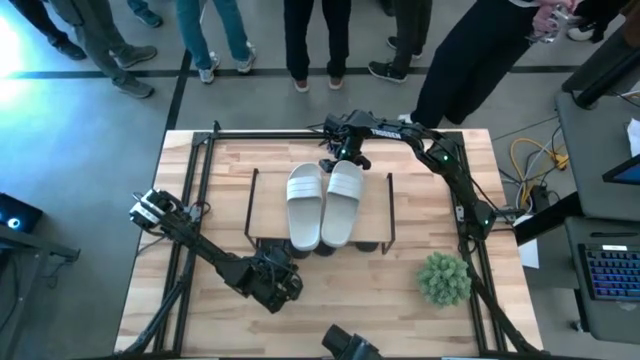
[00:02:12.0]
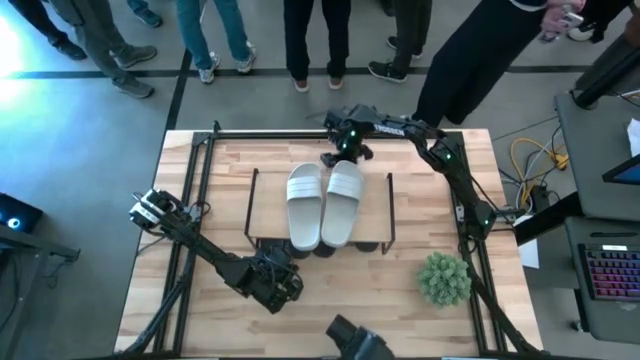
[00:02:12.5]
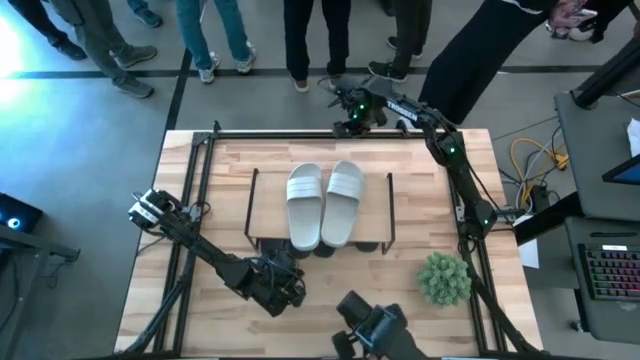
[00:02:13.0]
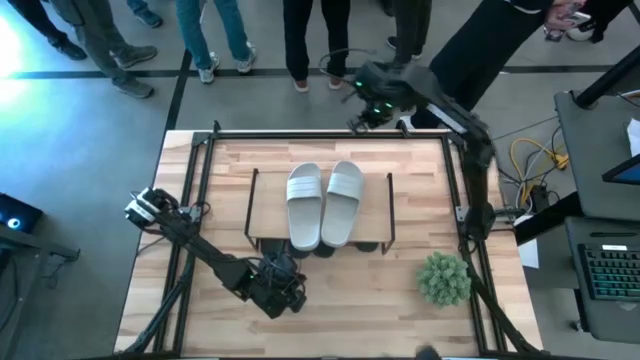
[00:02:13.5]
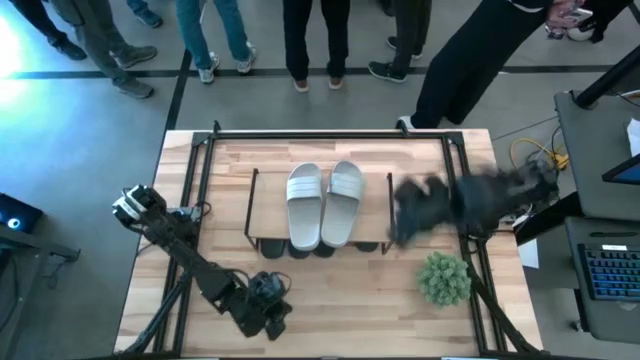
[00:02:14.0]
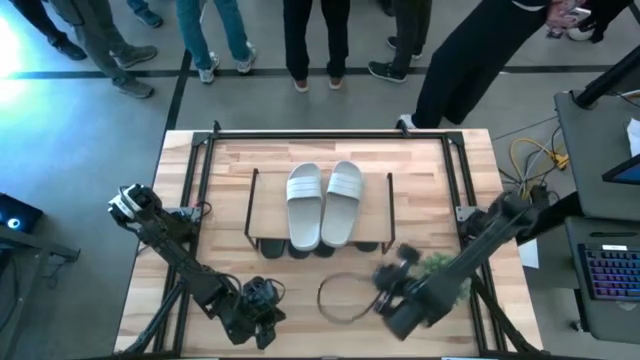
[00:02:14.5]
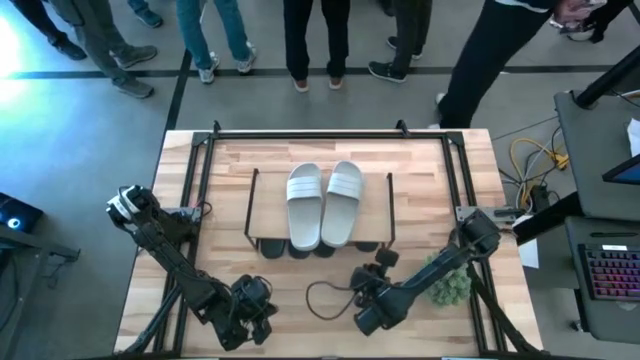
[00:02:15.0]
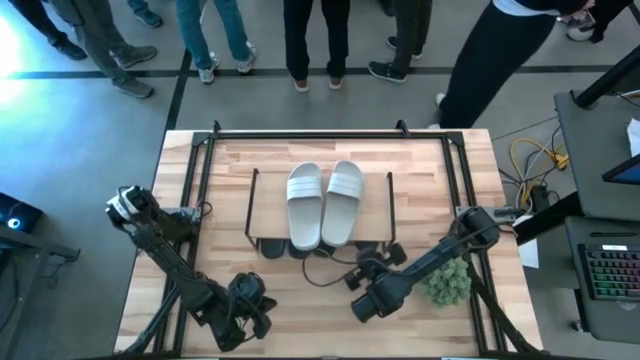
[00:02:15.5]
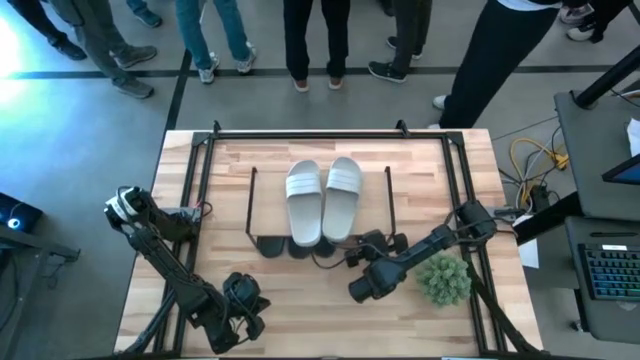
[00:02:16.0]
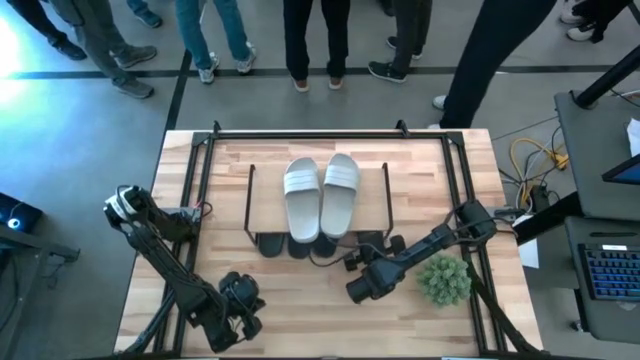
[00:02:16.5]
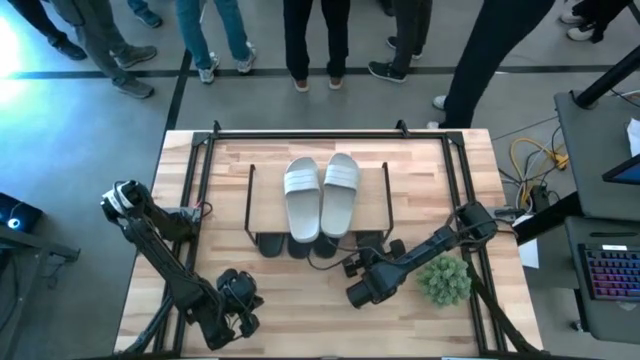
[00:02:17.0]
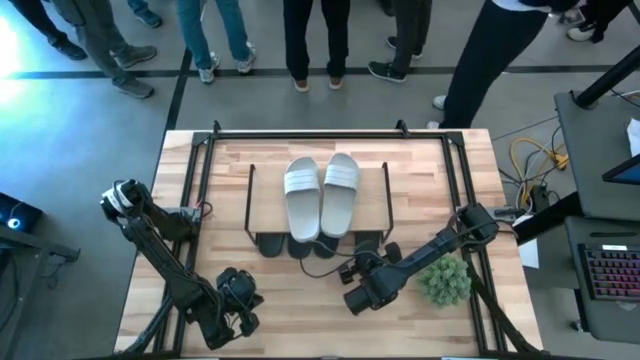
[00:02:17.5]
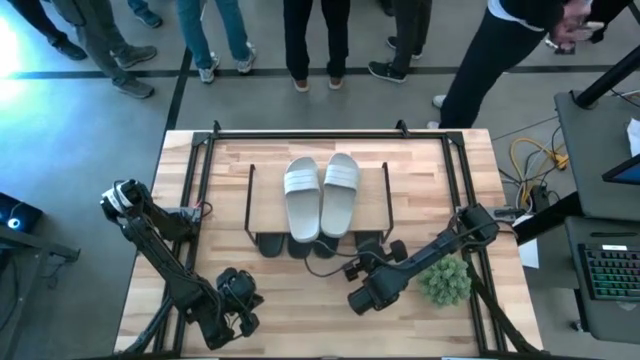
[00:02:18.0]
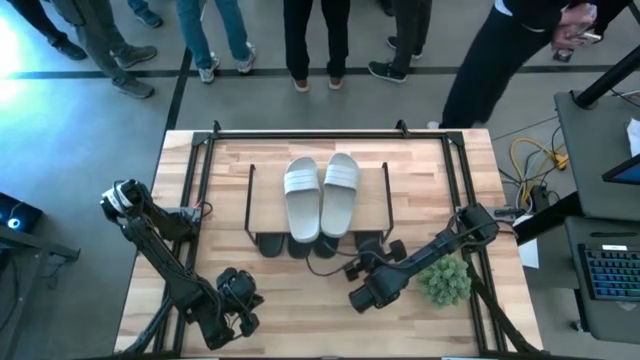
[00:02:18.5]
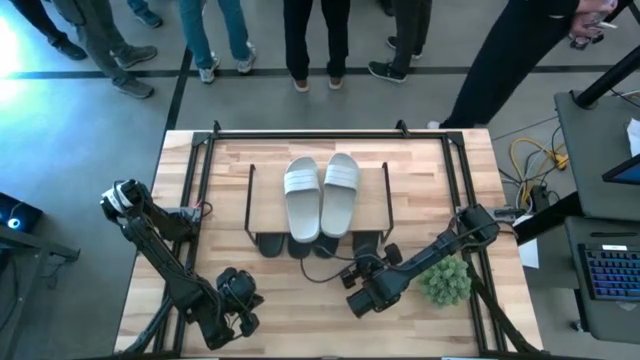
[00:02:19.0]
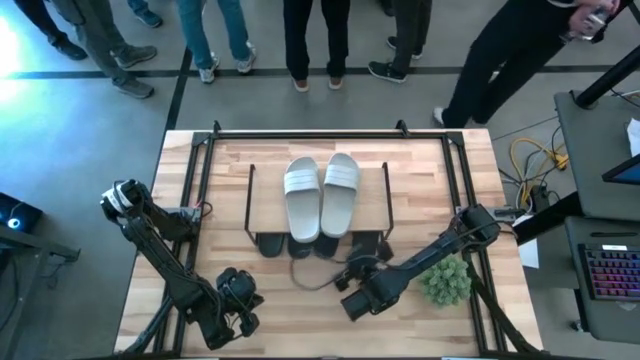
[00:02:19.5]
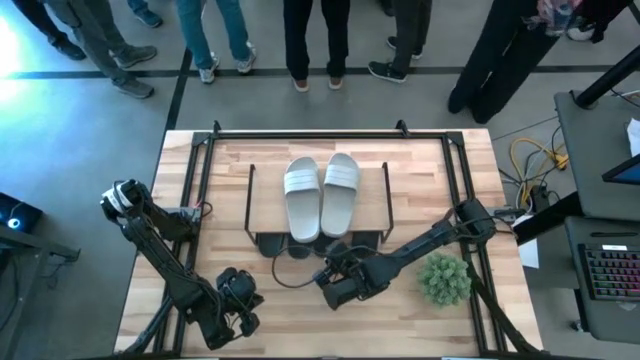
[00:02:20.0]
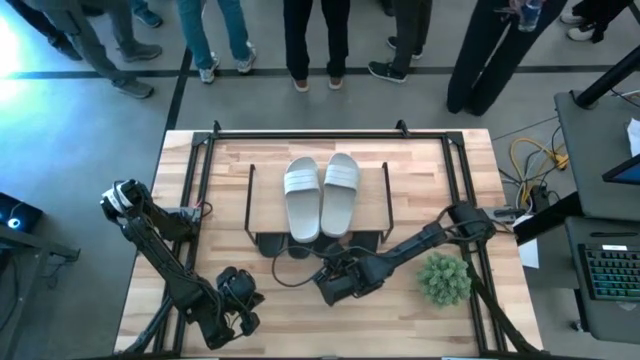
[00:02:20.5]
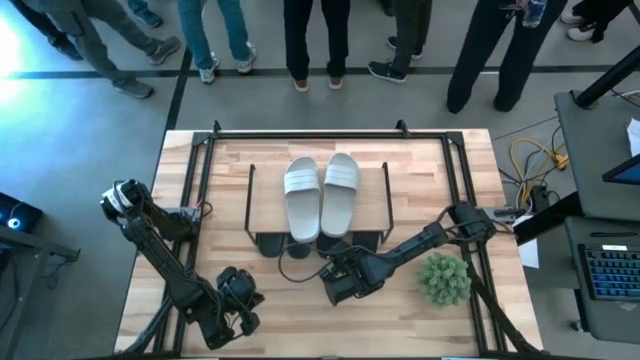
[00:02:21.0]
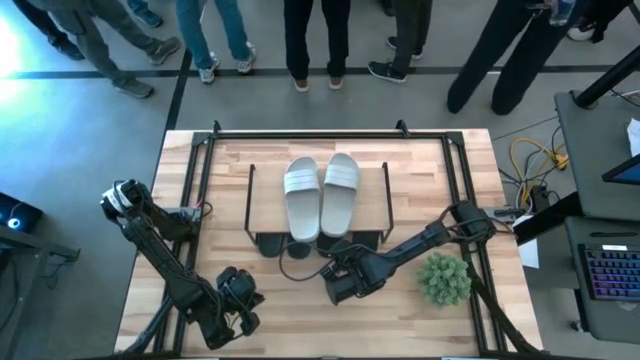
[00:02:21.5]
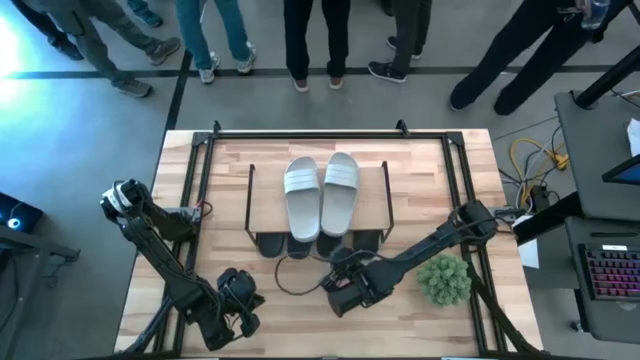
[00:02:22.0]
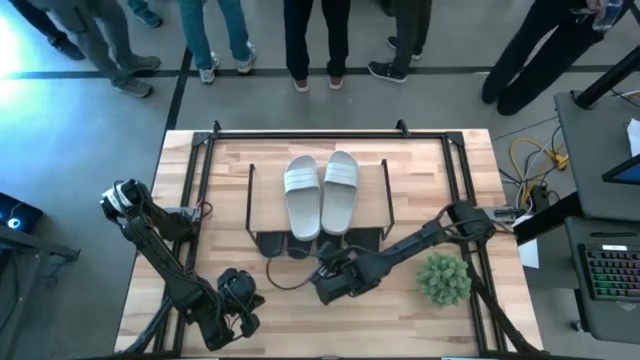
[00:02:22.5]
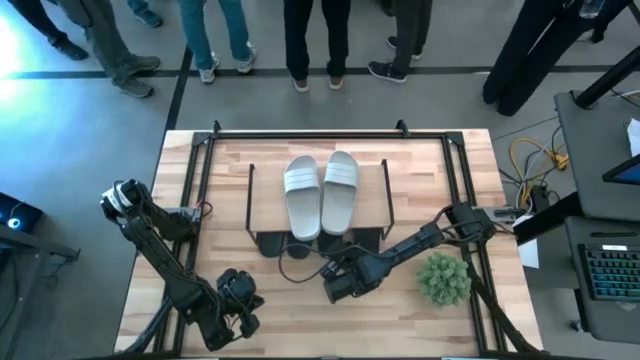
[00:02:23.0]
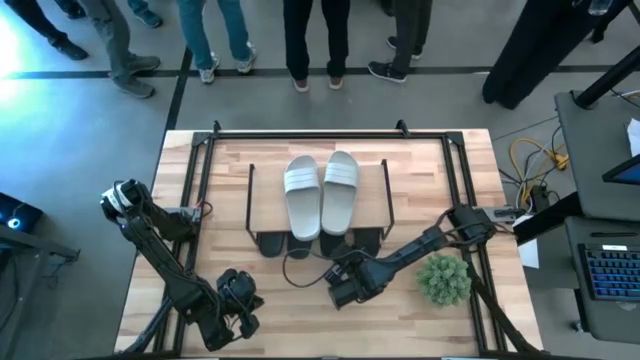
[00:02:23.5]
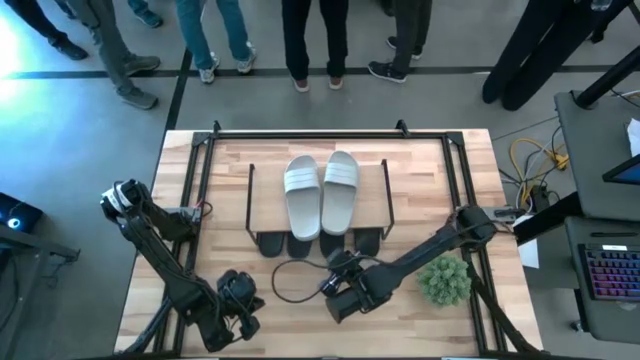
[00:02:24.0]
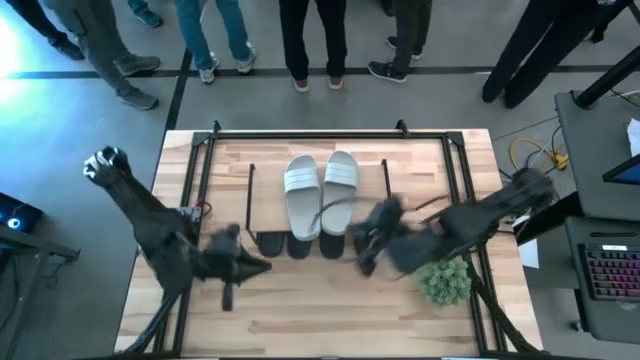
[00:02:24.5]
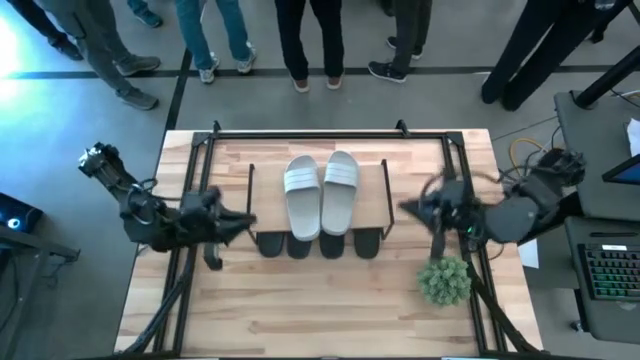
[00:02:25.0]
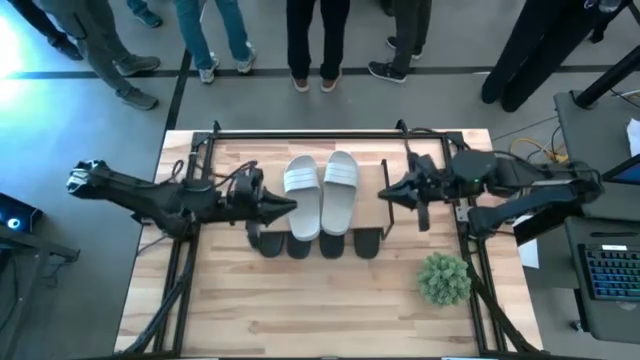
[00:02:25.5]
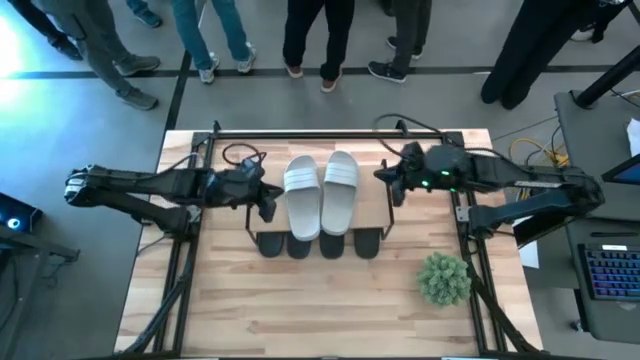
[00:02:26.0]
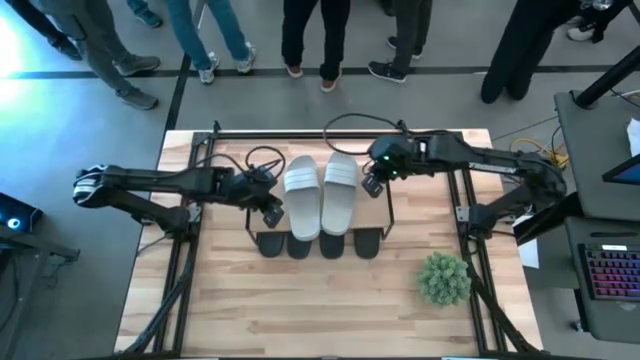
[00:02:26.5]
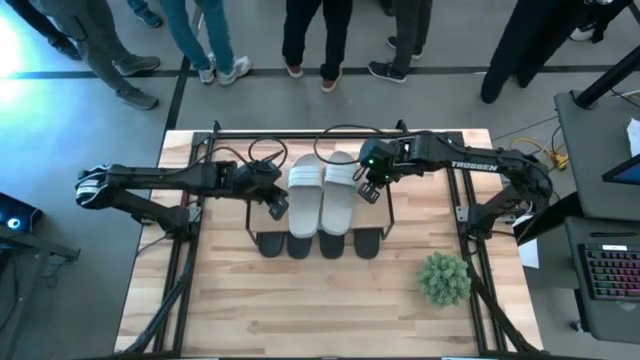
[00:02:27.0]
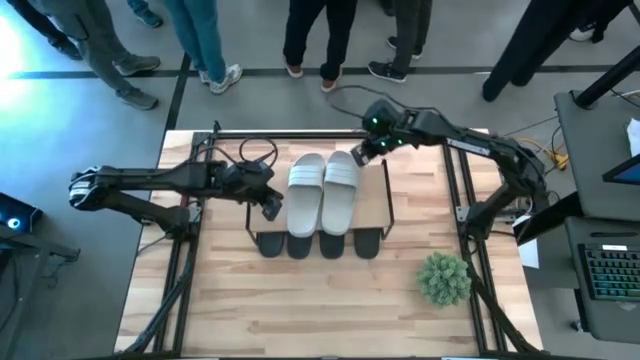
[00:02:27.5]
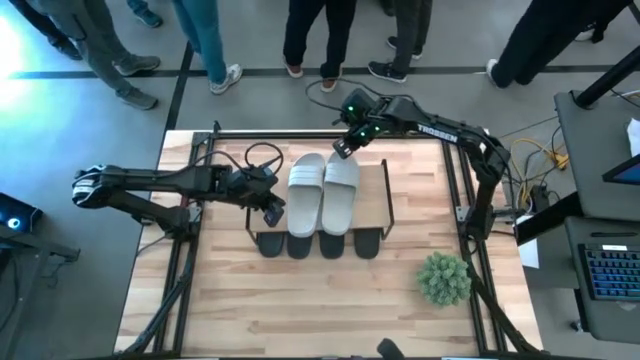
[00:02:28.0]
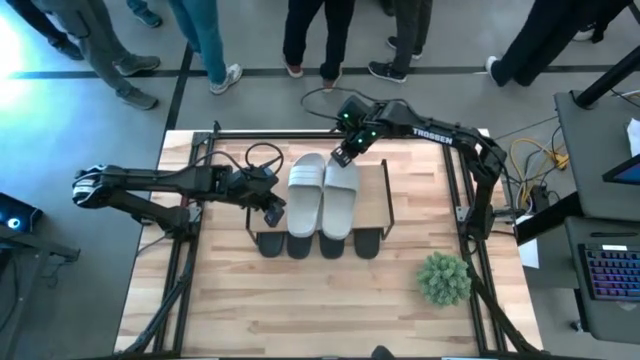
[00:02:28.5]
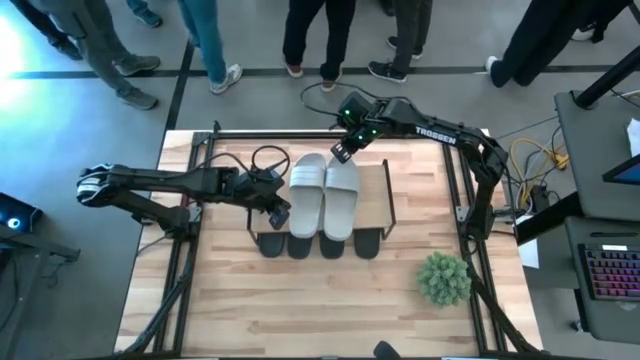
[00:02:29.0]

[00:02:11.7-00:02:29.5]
Task: Pick and place slides into the shelf
Adjust the slides on the shelf
